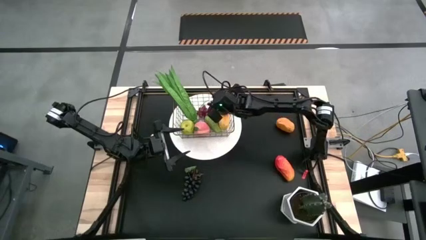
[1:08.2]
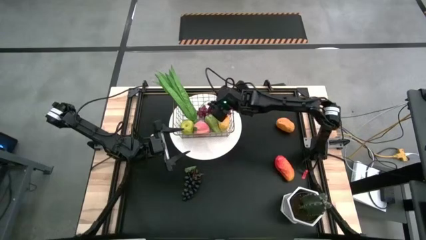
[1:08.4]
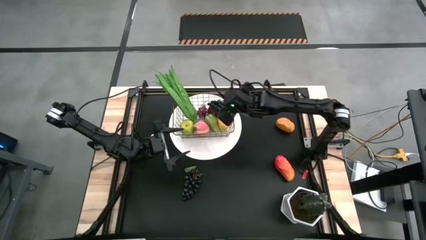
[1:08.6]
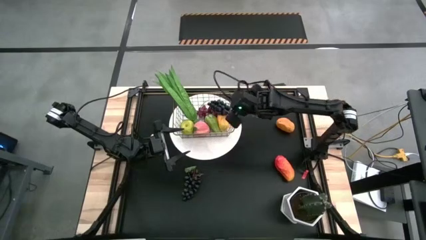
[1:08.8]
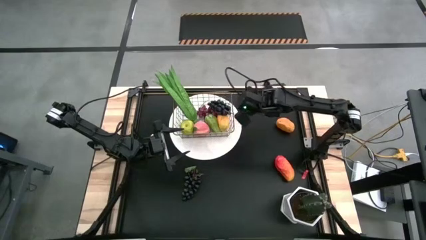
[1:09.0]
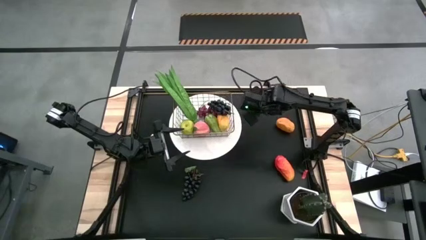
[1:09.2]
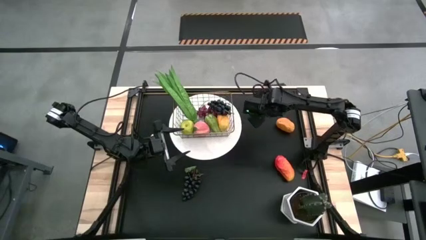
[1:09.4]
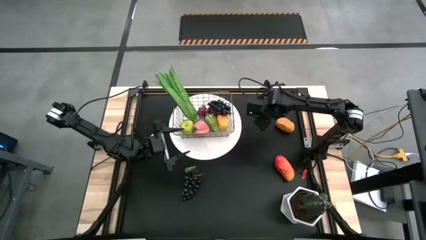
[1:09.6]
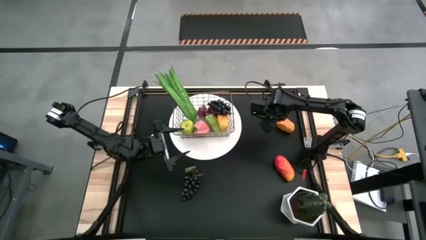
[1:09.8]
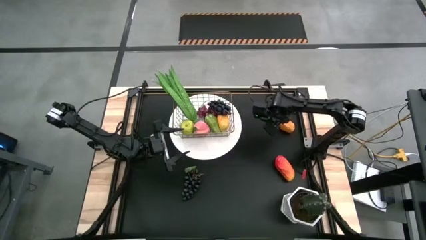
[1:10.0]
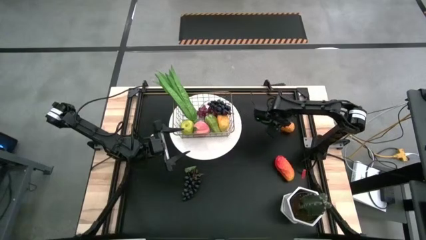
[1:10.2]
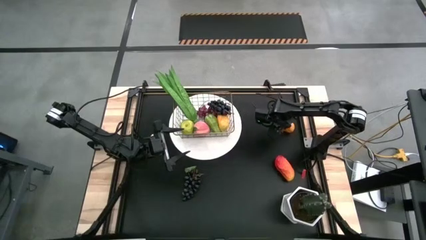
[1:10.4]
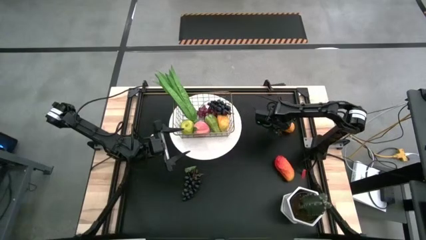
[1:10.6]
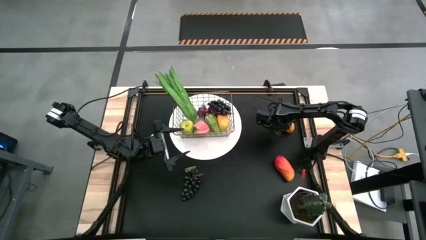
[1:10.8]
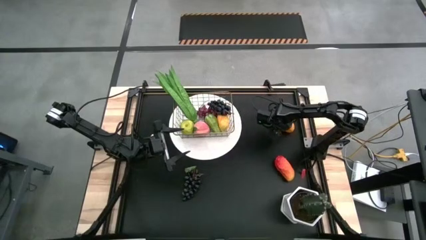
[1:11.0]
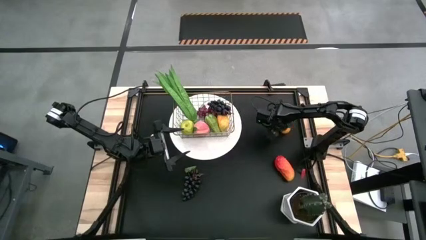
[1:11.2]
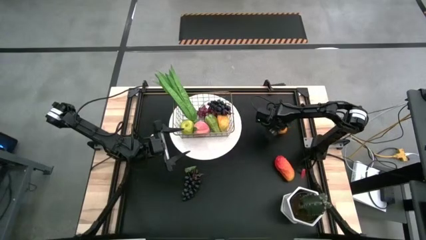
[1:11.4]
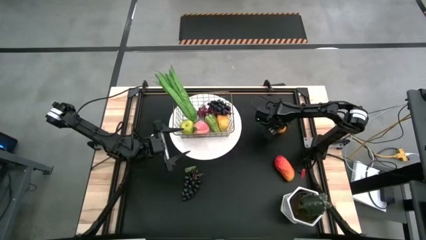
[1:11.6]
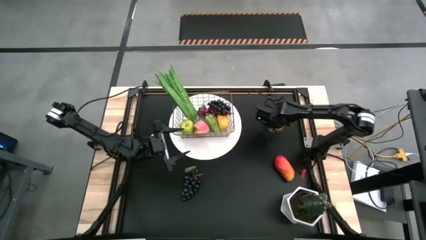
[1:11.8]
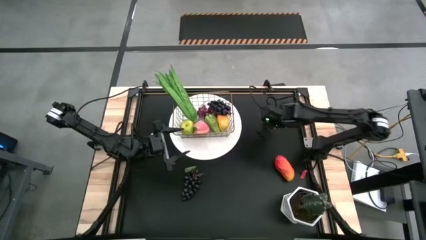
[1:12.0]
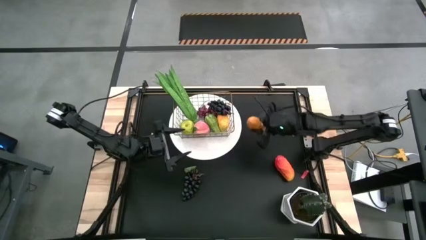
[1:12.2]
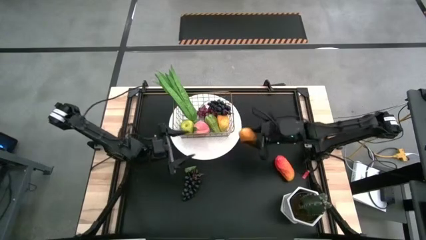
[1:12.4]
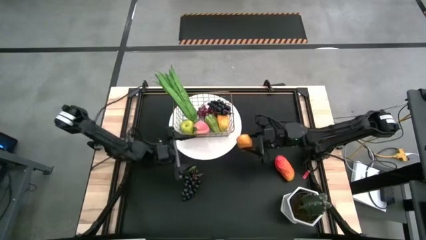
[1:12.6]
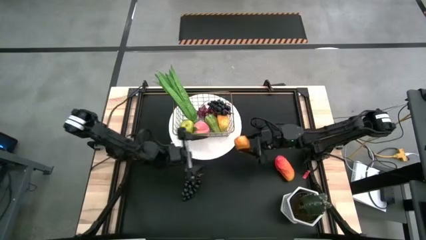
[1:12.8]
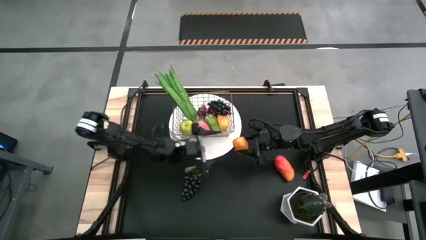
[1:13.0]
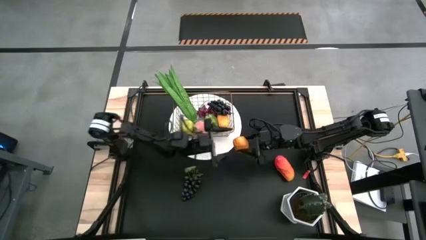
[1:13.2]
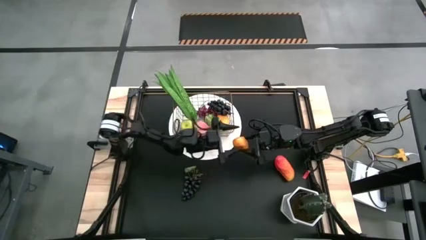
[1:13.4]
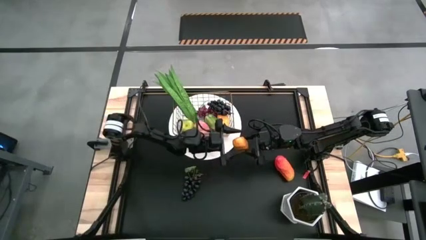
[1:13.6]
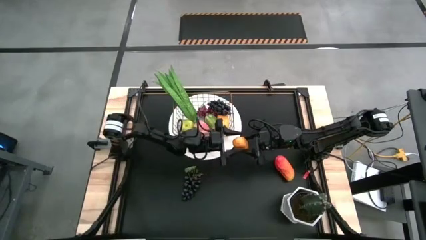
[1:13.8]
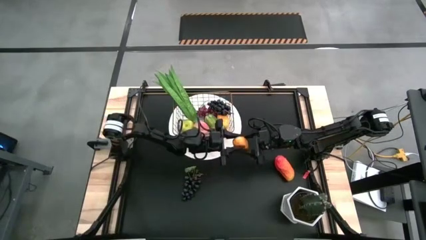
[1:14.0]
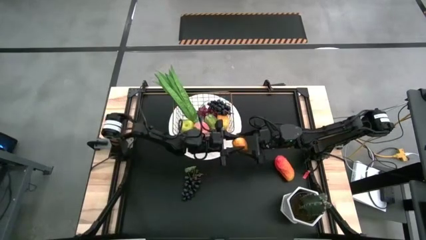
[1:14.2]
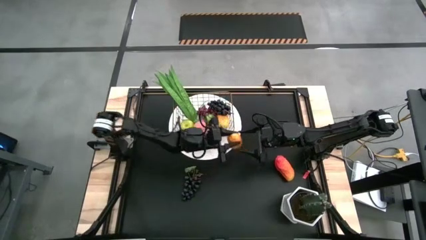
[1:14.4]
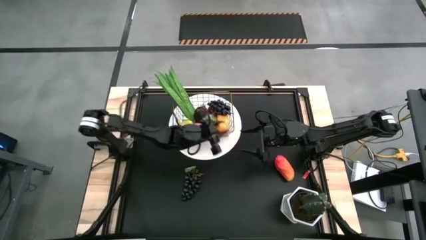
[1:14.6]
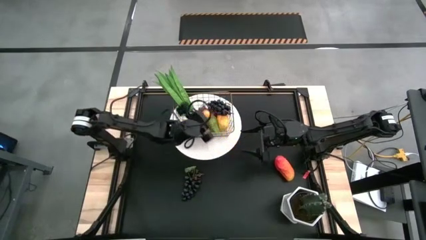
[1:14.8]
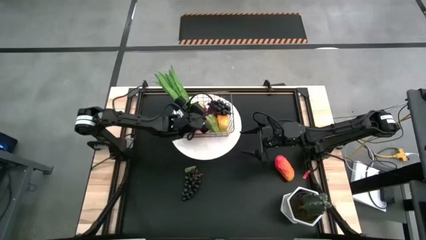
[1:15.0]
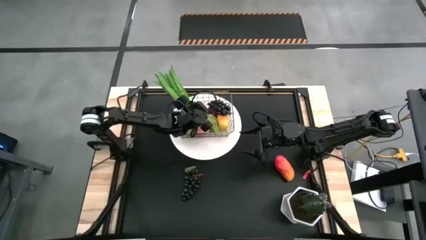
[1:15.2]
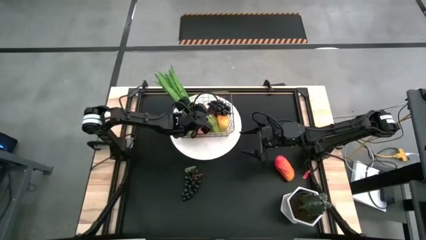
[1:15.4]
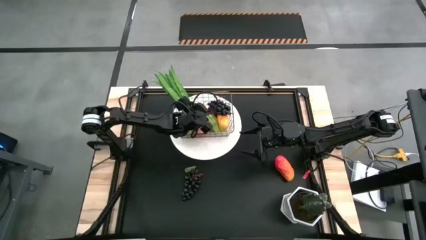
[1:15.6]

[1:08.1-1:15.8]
Task: Build produce basket
Put the yellow mango into the gold wire basket

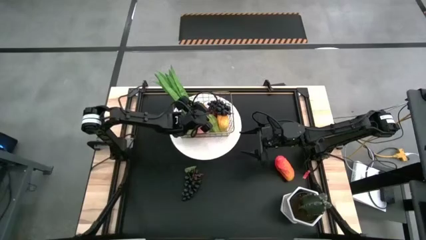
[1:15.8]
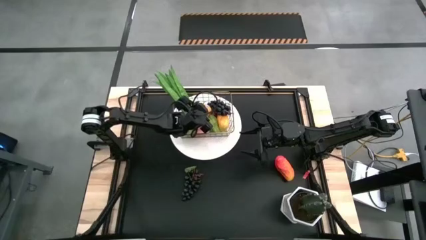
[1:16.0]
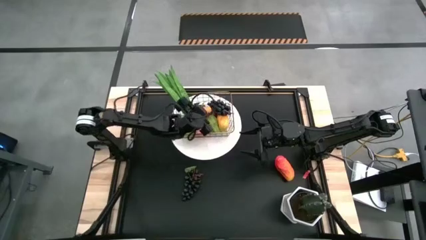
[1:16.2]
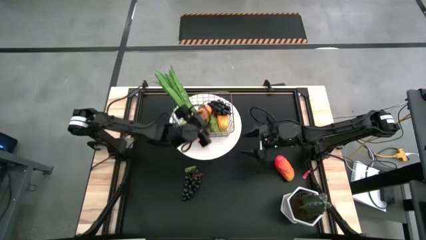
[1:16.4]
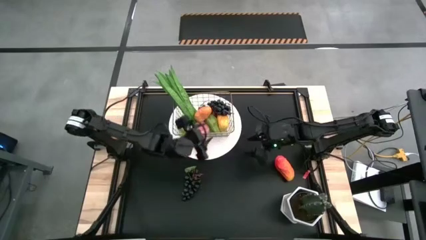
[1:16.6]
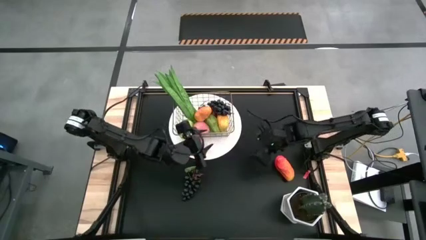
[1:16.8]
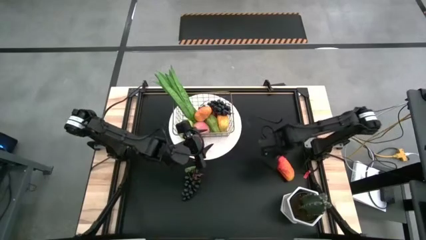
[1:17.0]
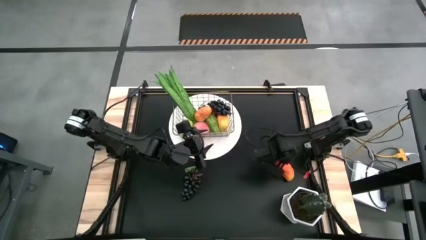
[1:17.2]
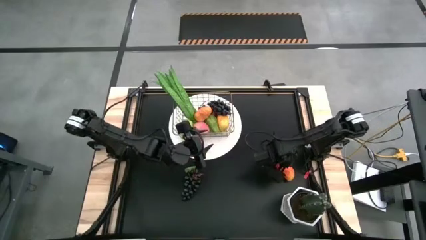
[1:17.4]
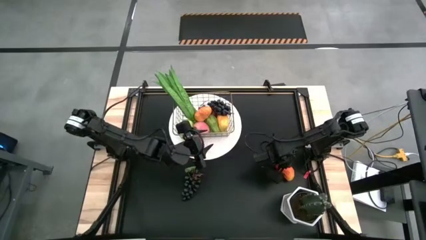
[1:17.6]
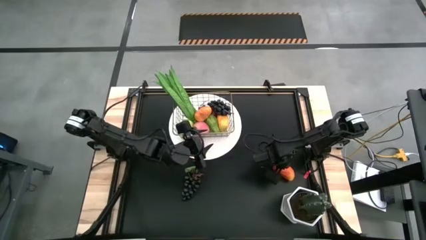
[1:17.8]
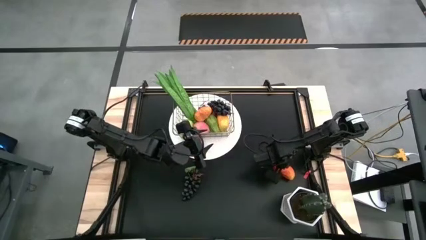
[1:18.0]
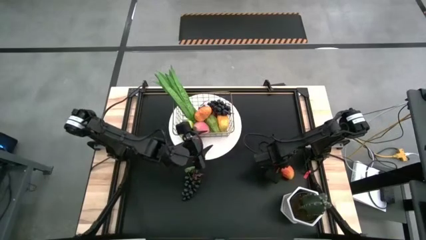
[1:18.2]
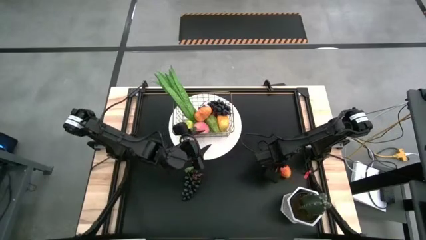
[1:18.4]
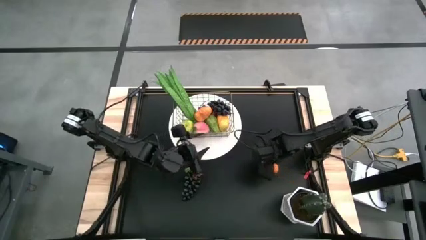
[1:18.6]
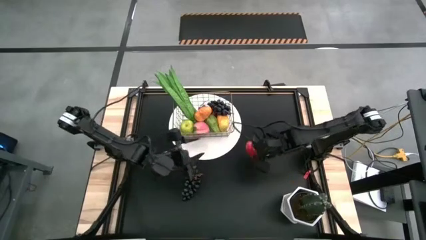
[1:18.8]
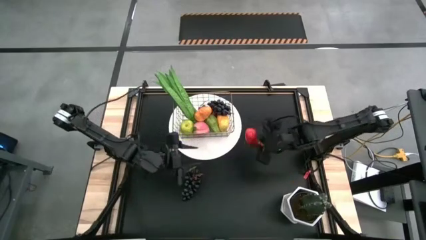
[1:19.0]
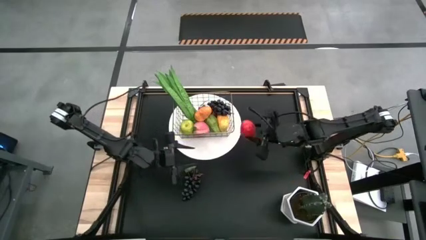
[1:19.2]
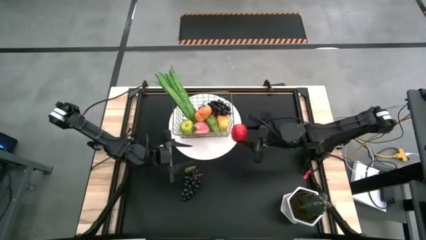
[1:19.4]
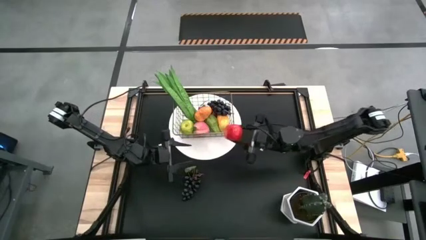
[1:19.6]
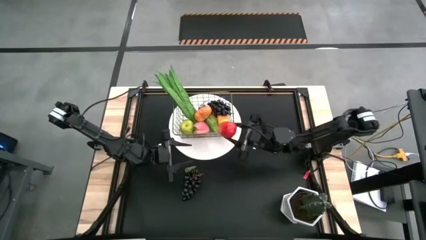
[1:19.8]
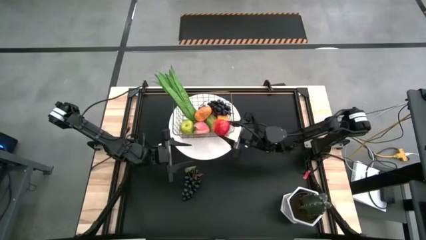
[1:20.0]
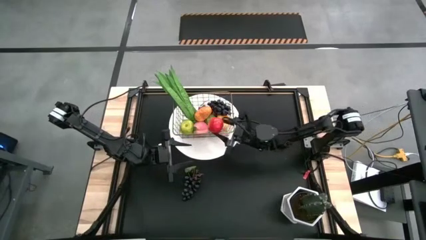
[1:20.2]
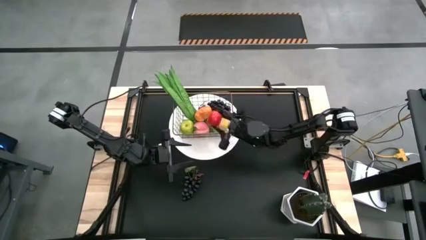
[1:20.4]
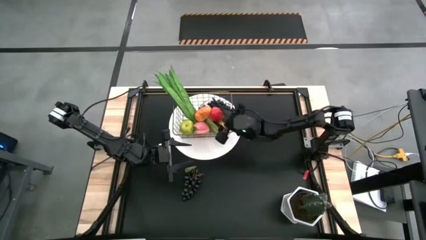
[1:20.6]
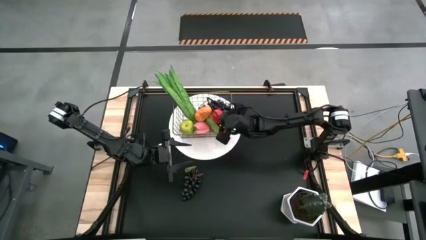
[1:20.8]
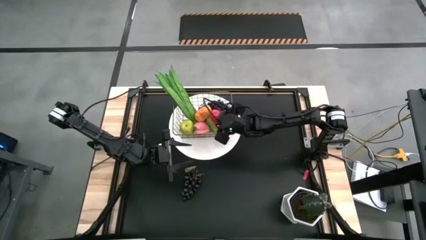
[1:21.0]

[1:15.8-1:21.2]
Put the orange mango into the gold wire basket

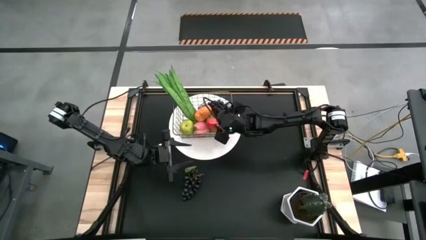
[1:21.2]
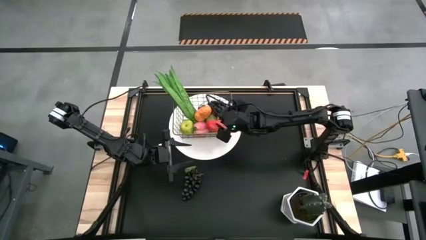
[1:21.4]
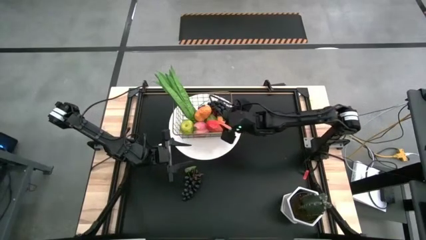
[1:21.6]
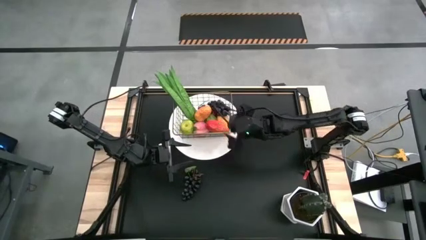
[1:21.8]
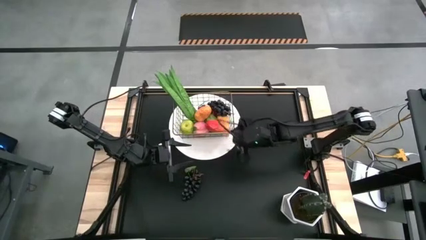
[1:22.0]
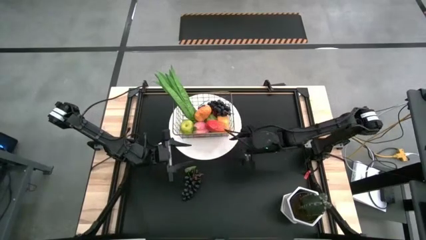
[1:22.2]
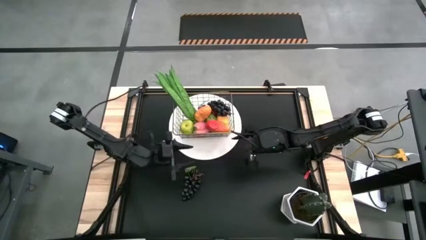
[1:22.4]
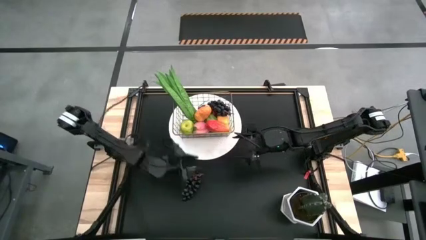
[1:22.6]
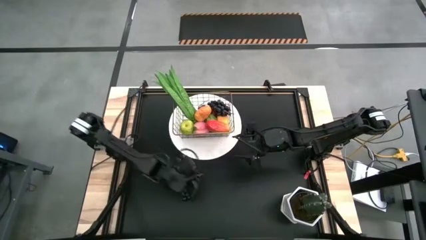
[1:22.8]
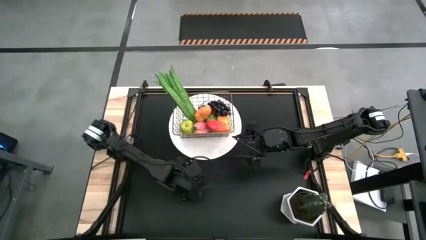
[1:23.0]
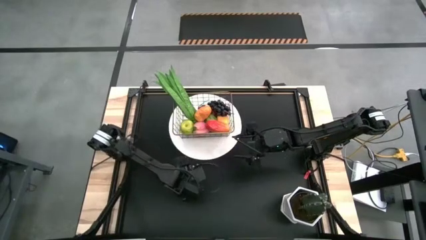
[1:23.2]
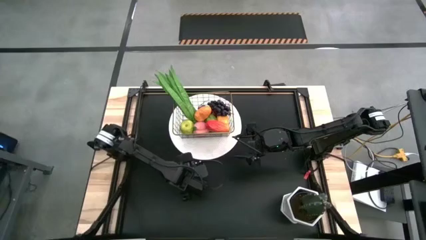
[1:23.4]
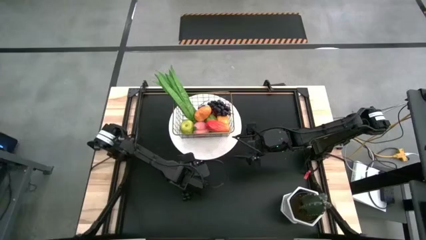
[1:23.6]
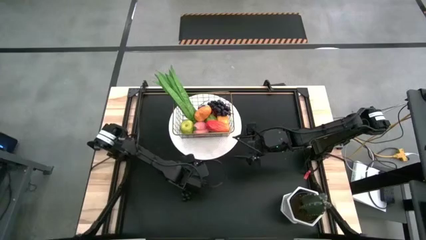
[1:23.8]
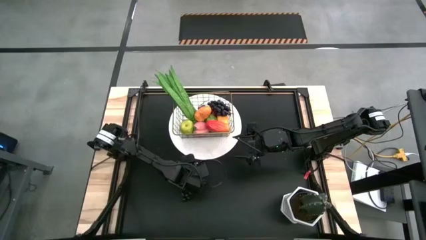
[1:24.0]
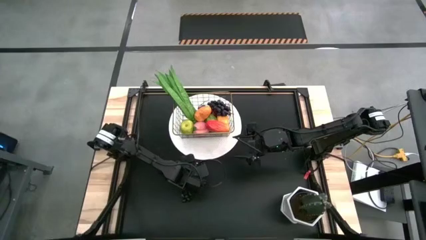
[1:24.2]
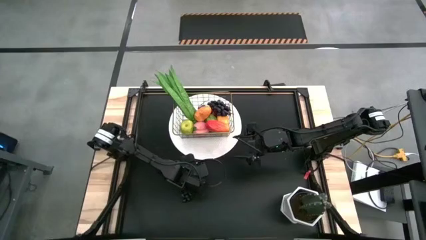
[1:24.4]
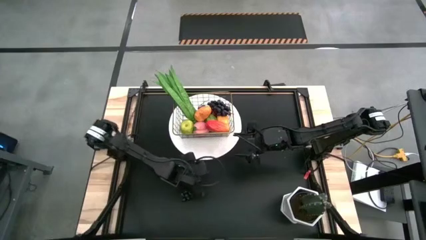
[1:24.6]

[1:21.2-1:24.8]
Put the black grapes into the gold wire basket
